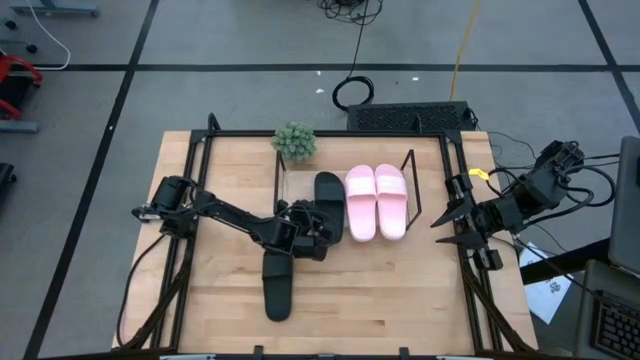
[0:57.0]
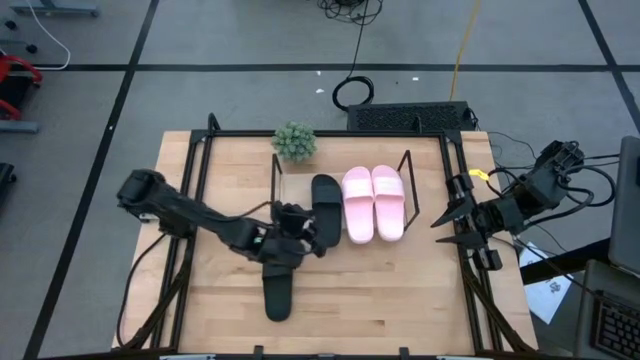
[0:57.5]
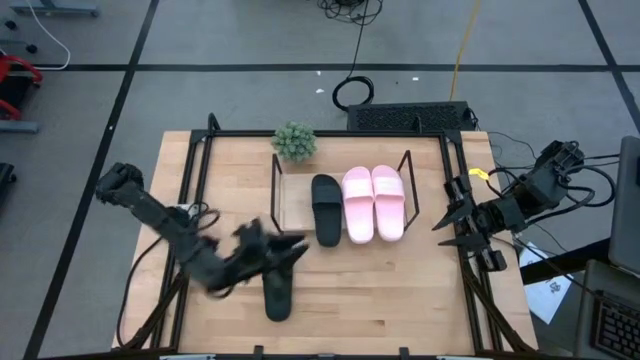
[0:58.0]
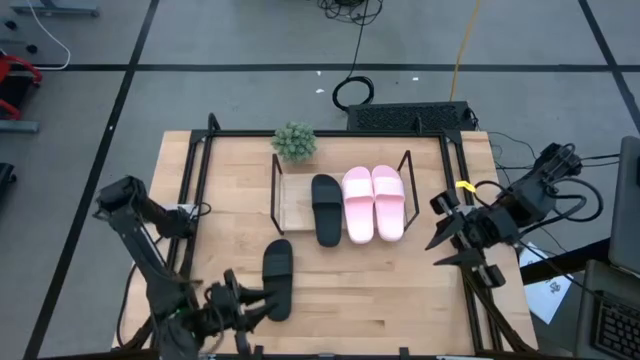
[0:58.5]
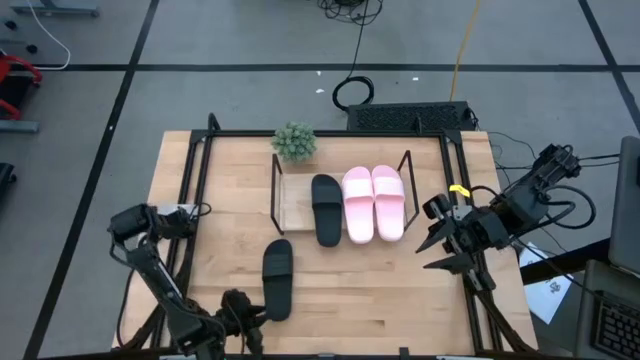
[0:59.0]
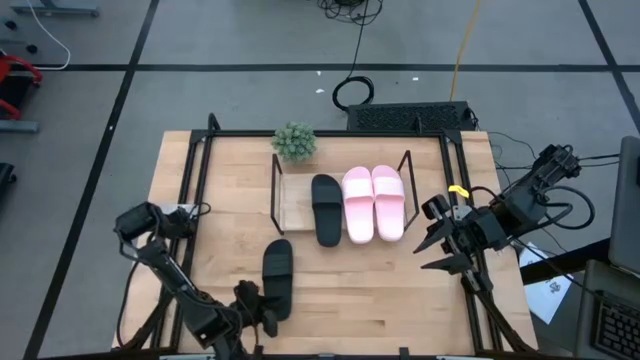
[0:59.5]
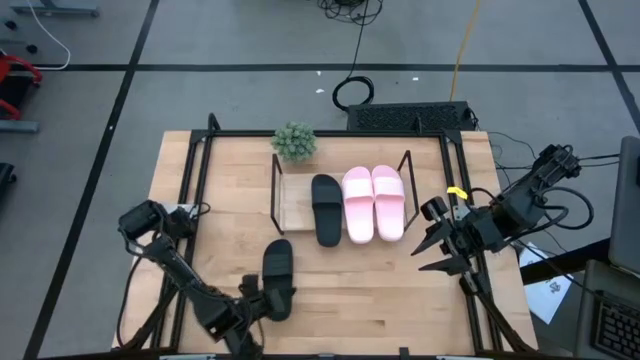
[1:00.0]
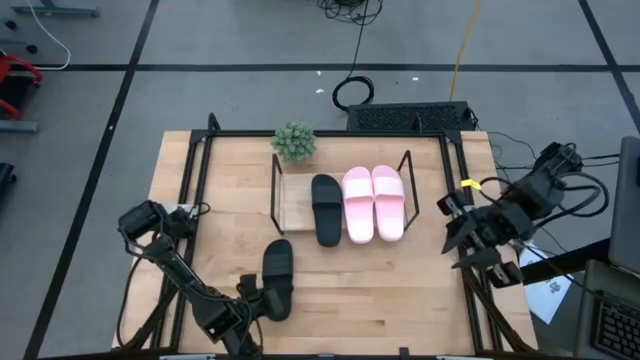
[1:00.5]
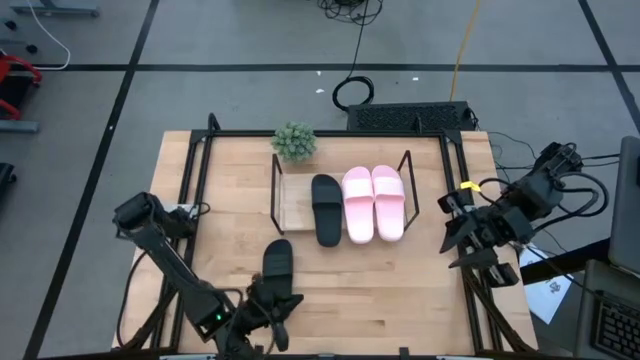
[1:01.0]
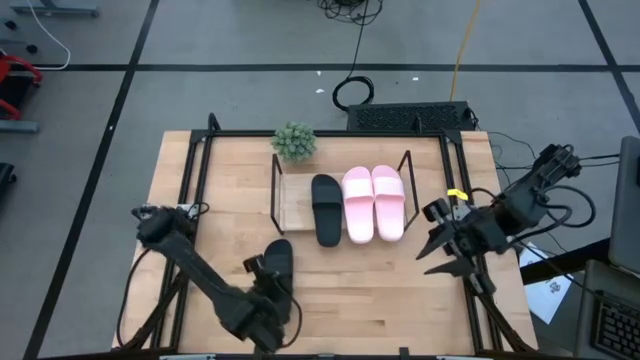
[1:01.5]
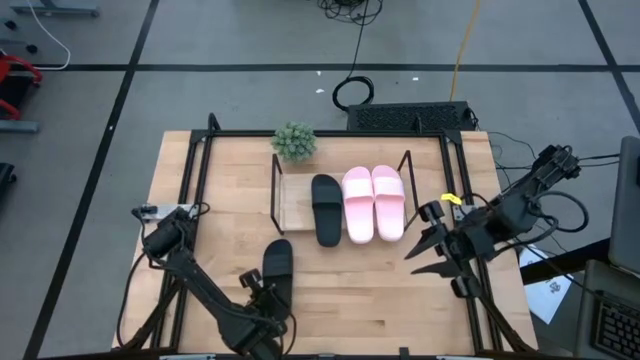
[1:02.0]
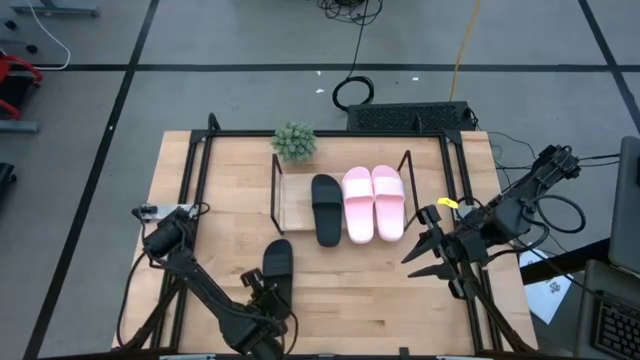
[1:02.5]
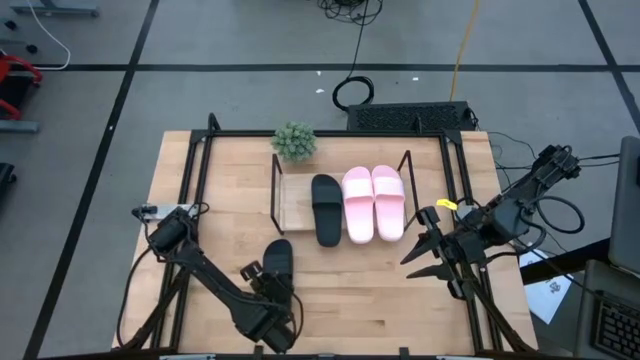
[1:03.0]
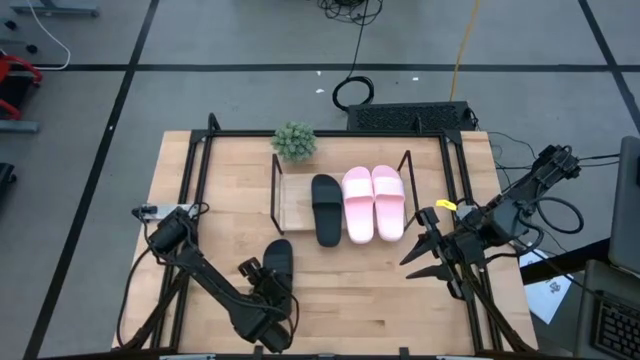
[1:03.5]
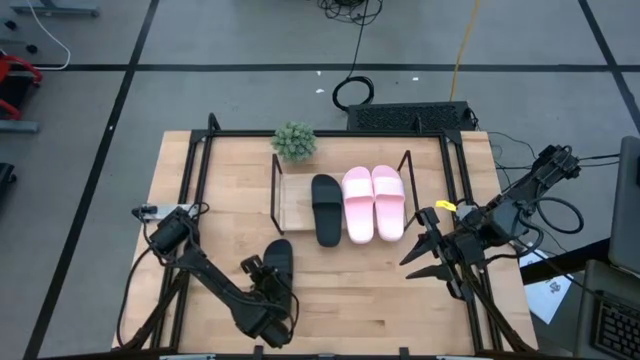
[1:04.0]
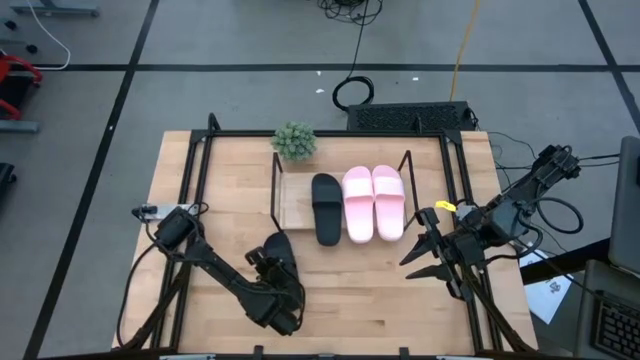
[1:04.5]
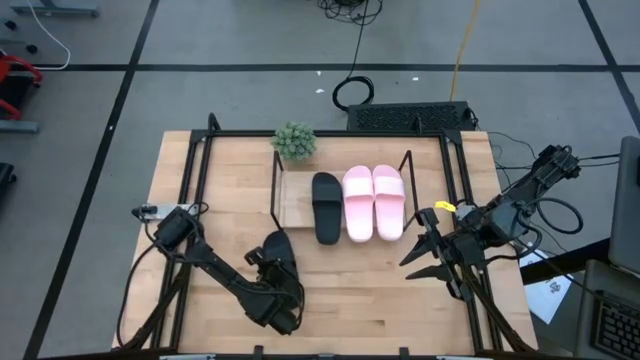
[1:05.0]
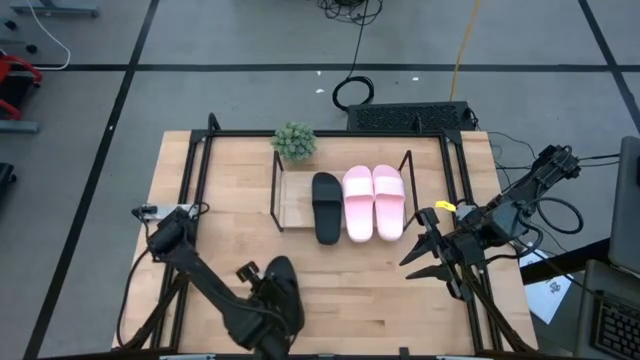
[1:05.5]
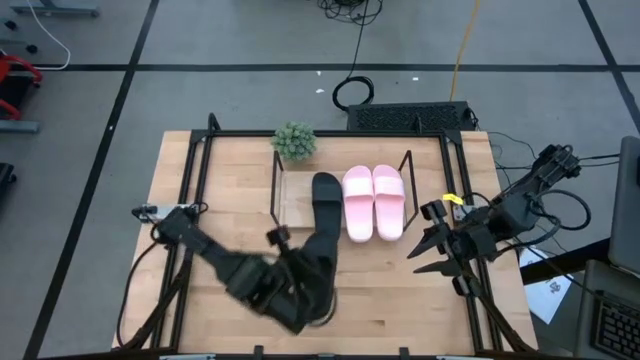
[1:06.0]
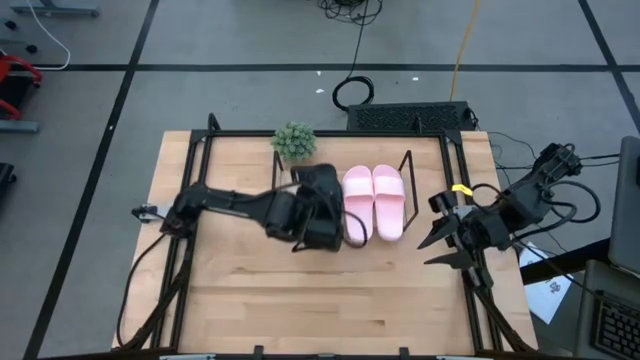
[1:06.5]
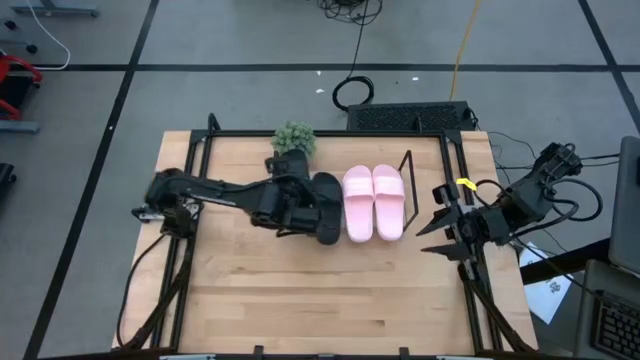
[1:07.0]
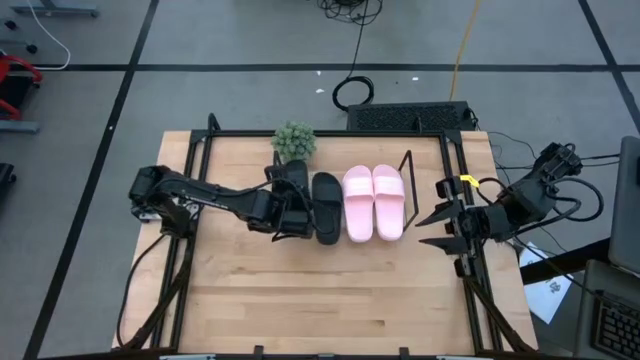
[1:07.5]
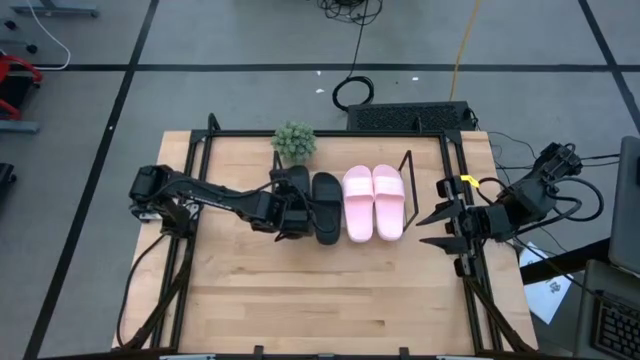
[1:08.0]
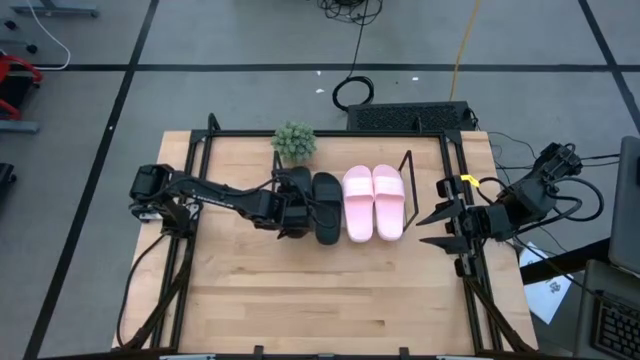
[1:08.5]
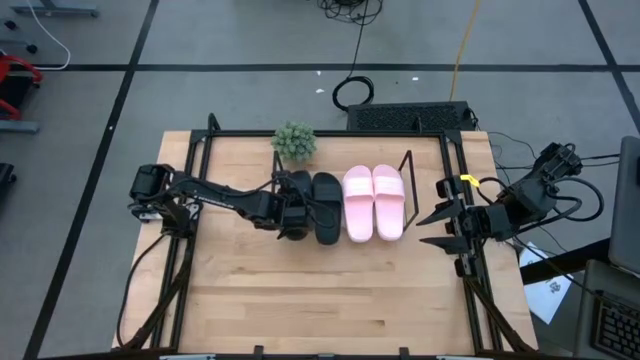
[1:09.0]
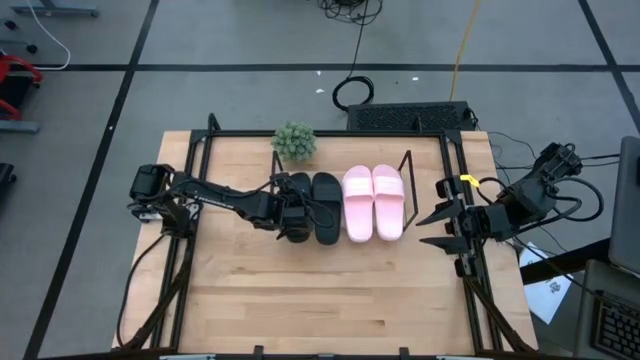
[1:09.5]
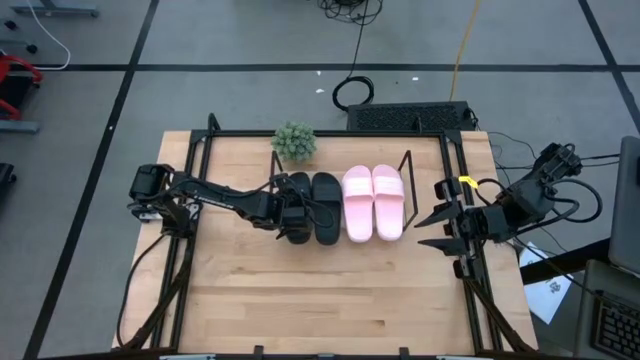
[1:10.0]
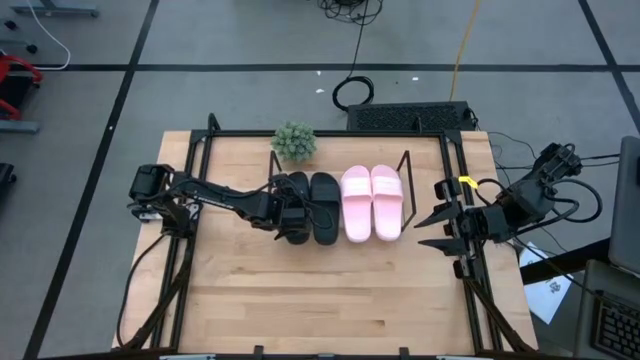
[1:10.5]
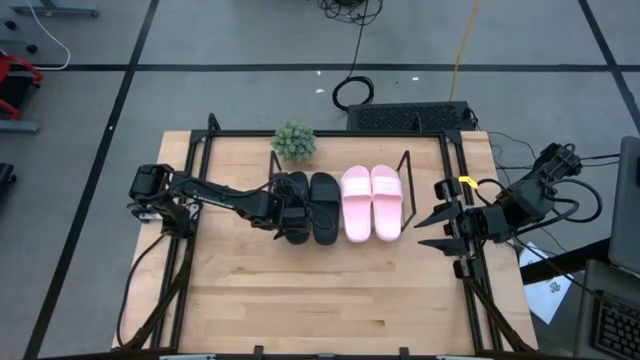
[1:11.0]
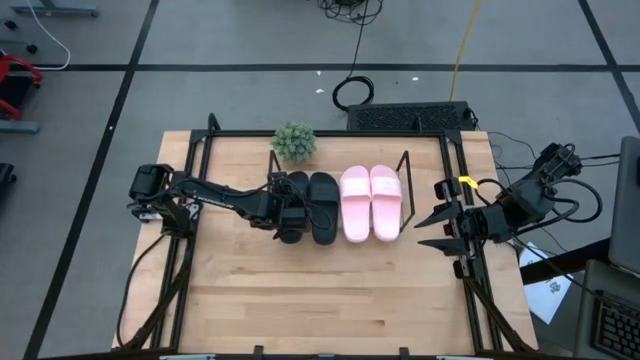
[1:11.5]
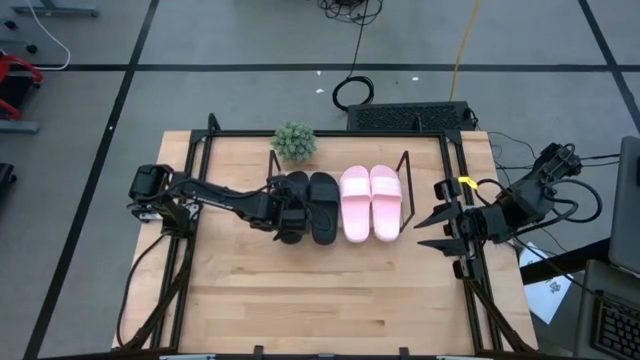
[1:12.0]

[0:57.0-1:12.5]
Task: Pick and place slides into the shelf
Put the black slide on the shelf

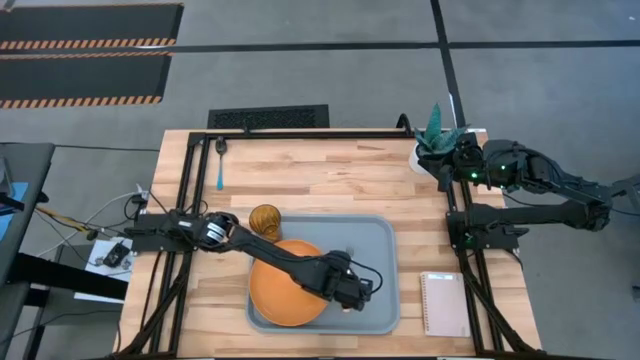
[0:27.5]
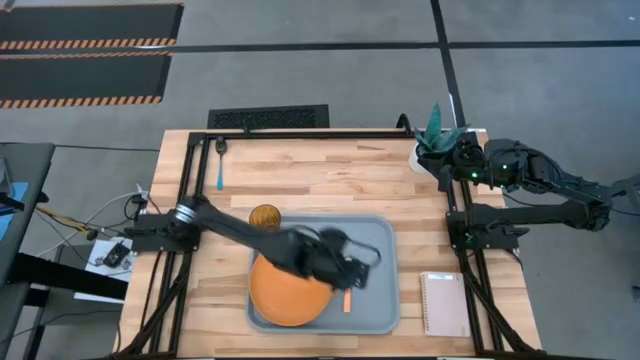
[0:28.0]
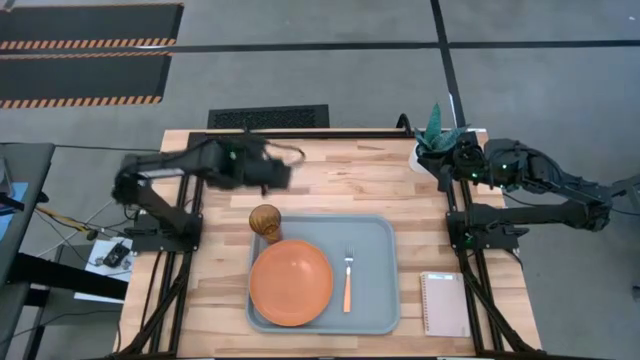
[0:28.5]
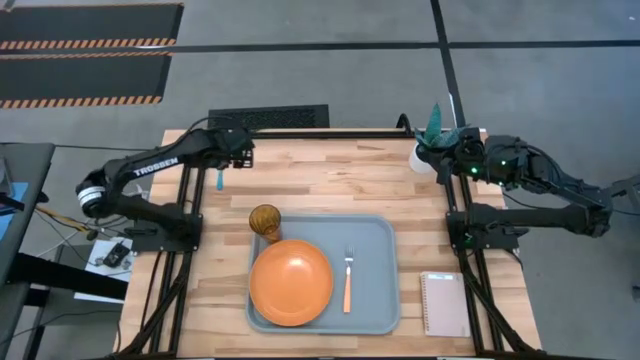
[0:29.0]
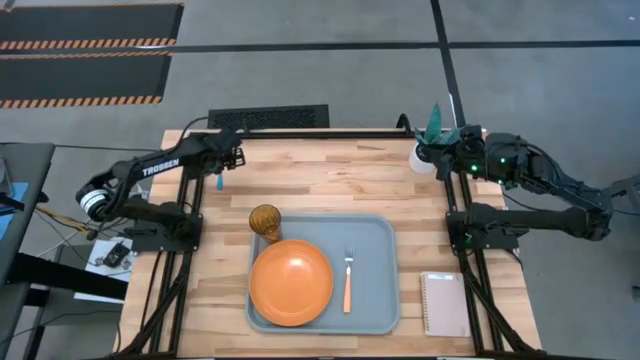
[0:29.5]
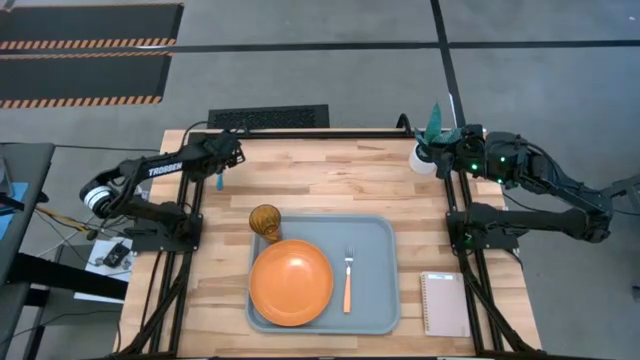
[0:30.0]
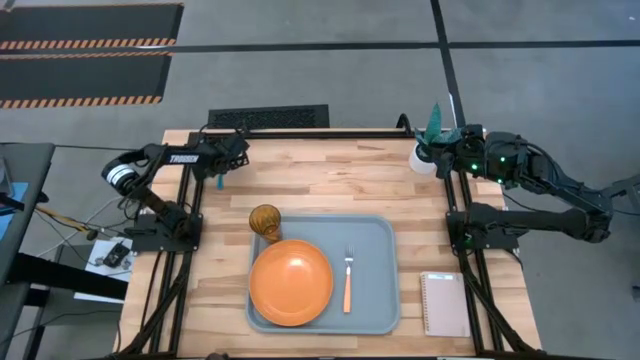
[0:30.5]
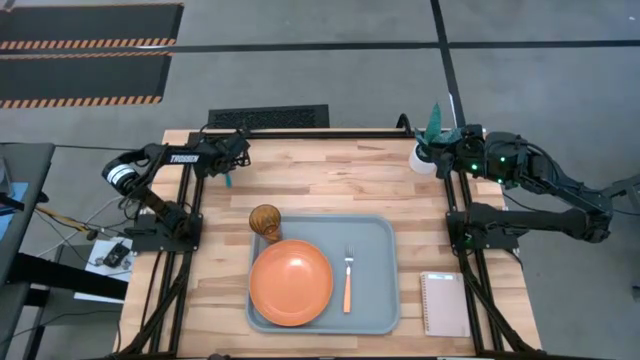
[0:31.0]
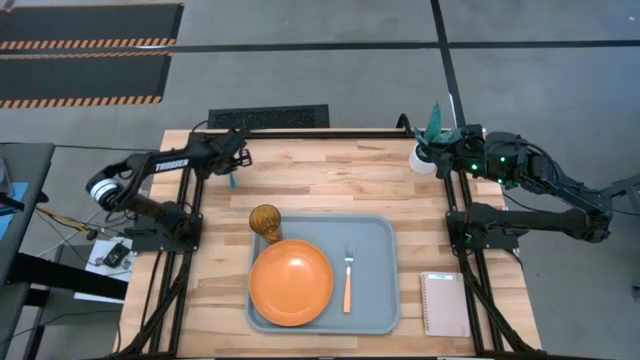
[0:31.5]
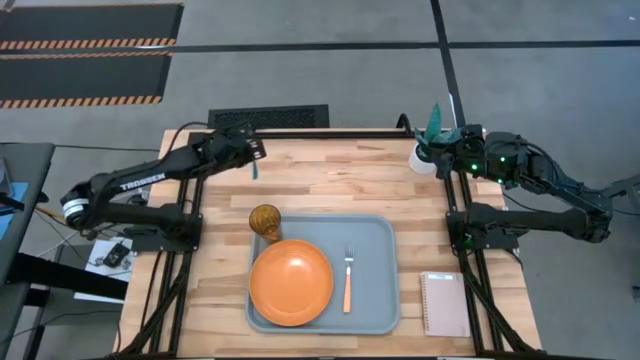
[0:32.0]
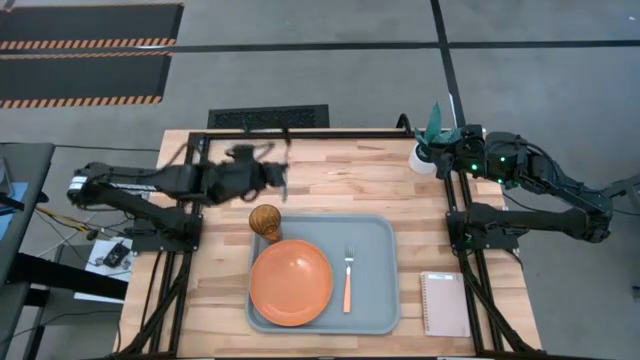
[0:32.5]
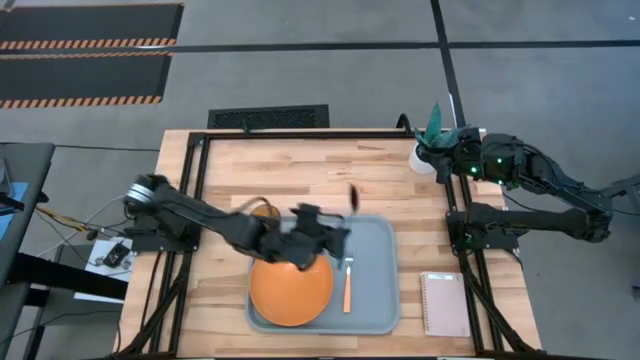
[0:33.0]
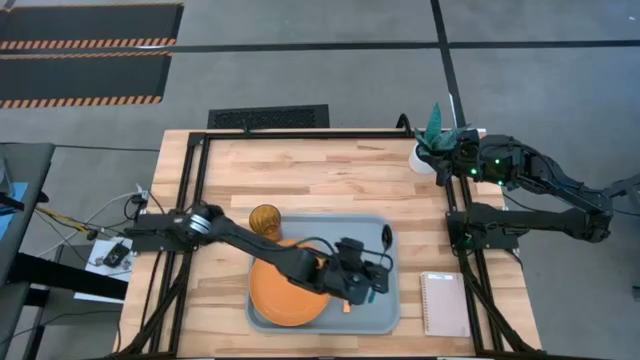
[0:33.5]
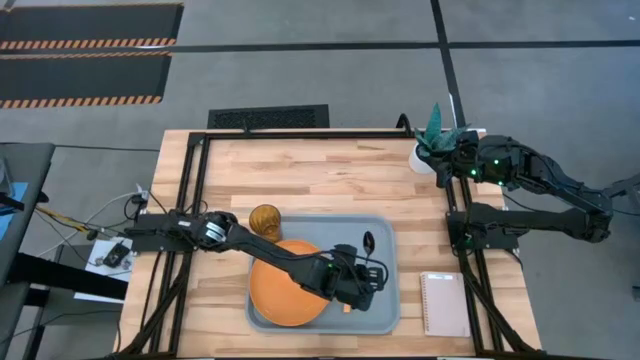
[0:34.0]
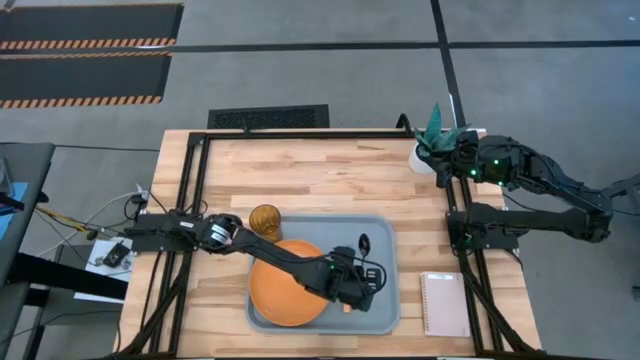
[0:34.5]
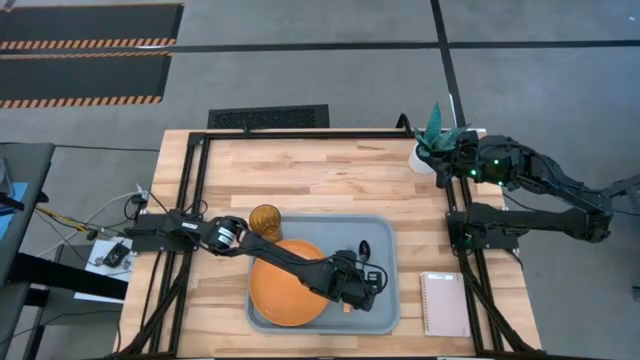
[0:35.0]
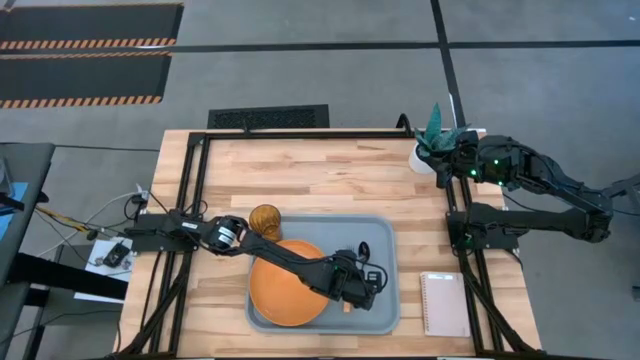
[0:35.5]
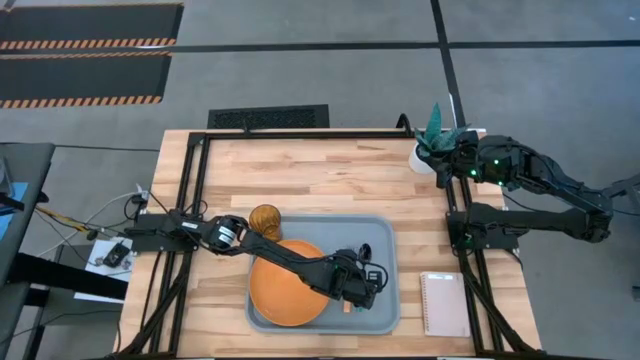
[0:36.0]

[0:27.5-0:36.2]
Task: Pick and place plate/cup/fork/spoon on tray
Put the blue spoon on the gray tray to the right of the orange fork
